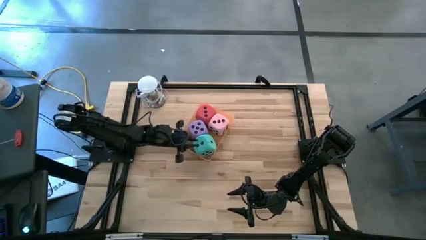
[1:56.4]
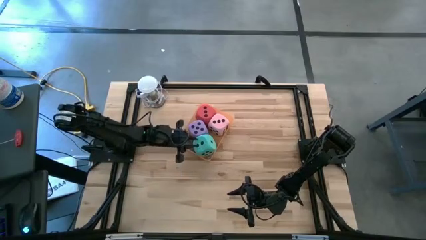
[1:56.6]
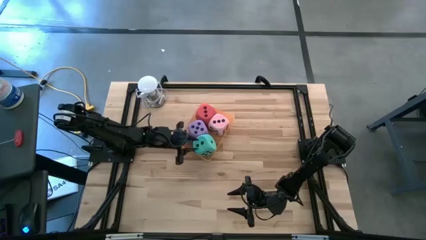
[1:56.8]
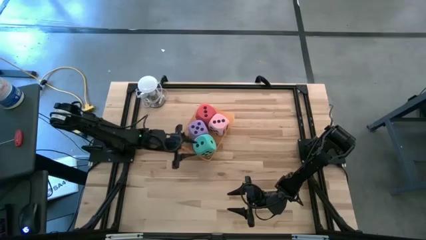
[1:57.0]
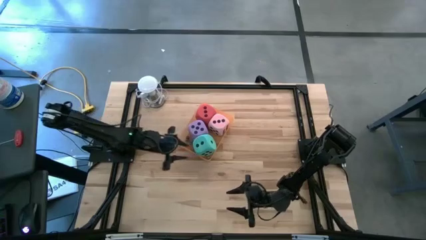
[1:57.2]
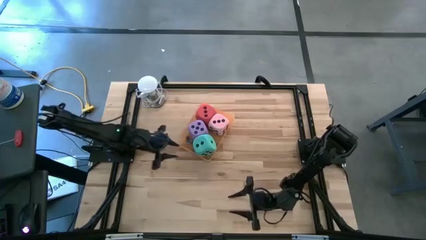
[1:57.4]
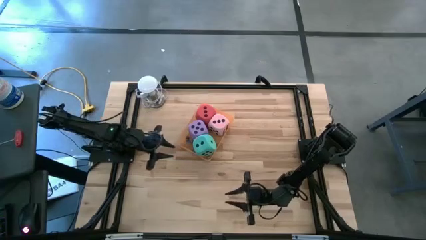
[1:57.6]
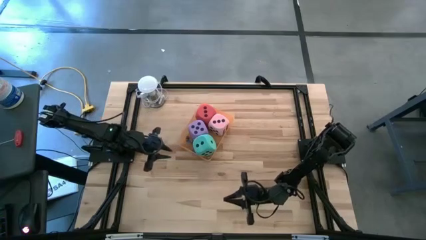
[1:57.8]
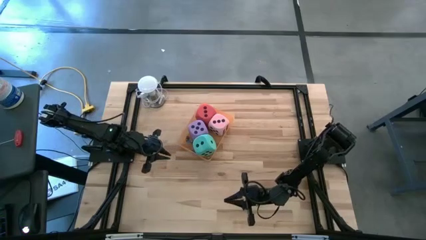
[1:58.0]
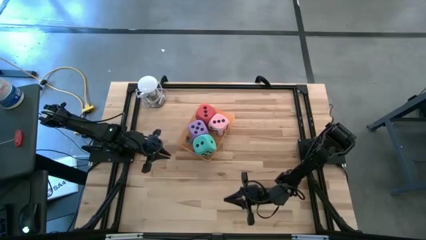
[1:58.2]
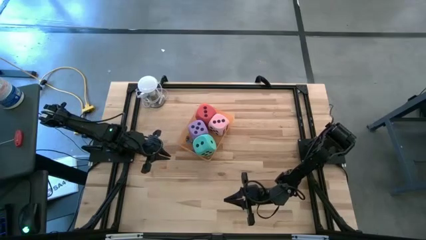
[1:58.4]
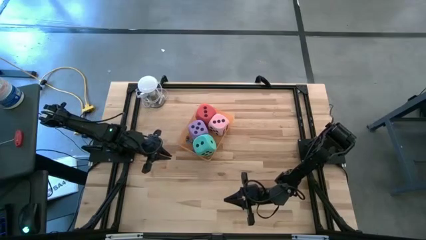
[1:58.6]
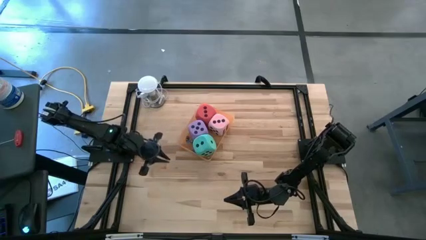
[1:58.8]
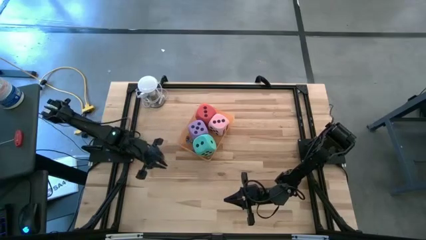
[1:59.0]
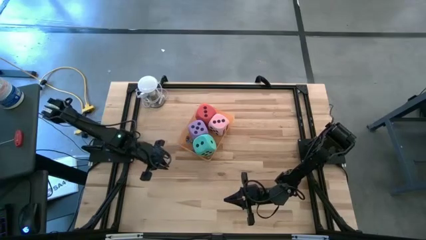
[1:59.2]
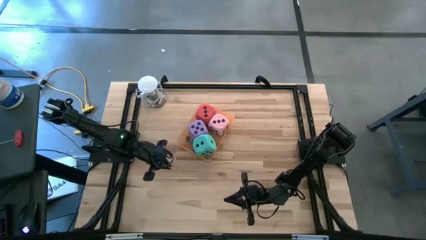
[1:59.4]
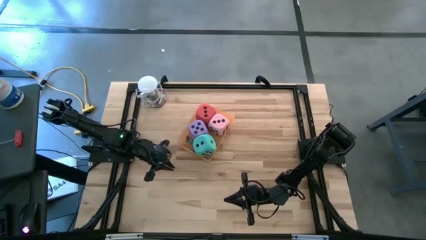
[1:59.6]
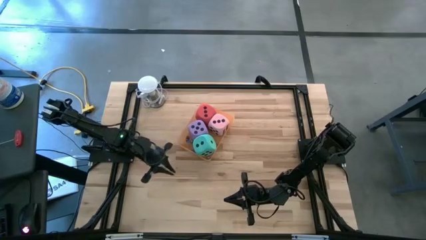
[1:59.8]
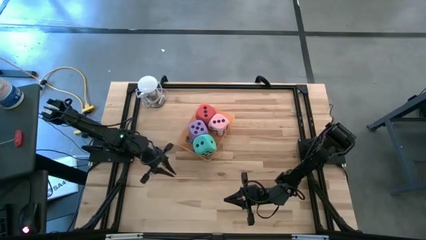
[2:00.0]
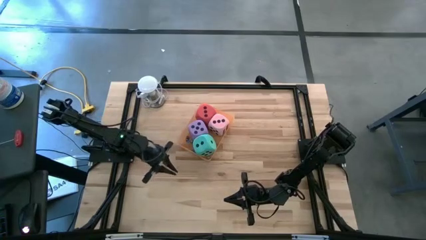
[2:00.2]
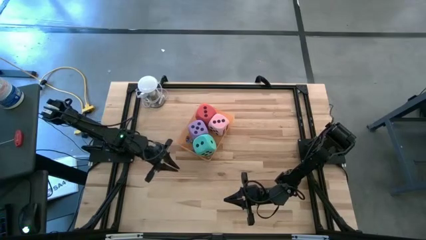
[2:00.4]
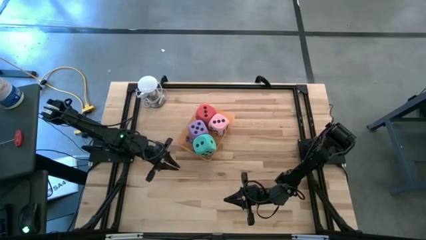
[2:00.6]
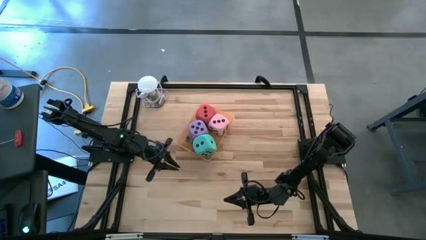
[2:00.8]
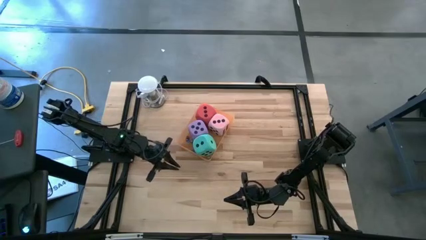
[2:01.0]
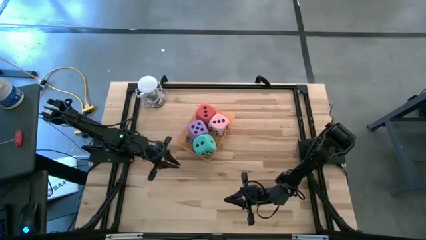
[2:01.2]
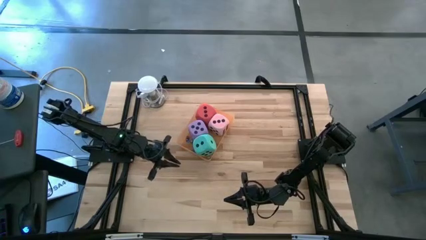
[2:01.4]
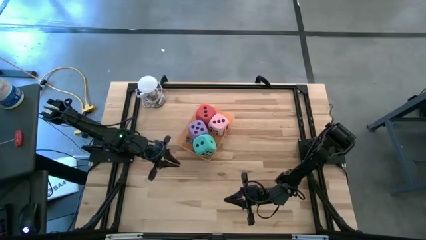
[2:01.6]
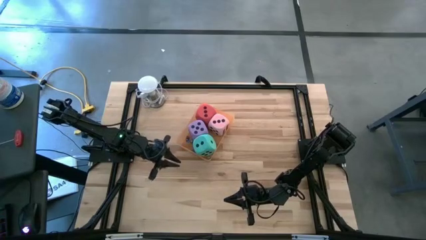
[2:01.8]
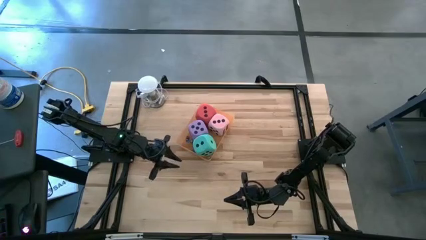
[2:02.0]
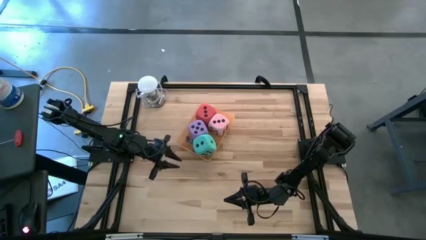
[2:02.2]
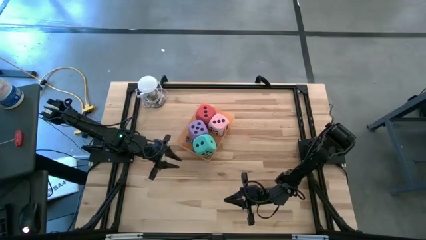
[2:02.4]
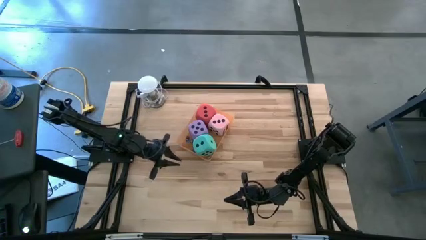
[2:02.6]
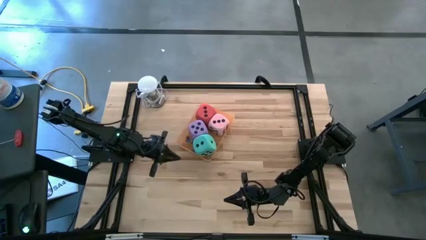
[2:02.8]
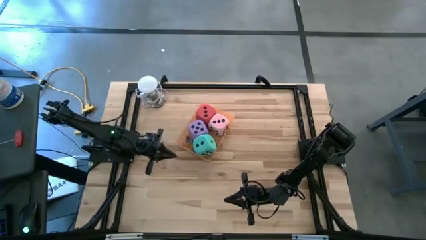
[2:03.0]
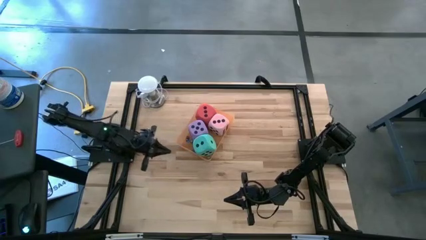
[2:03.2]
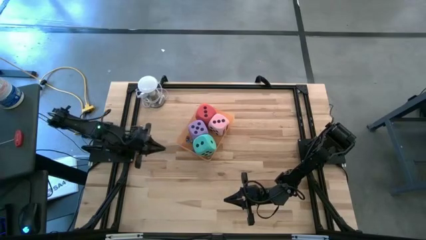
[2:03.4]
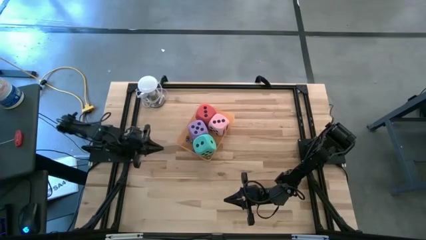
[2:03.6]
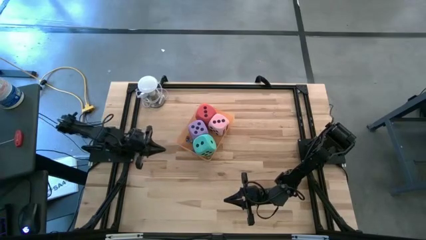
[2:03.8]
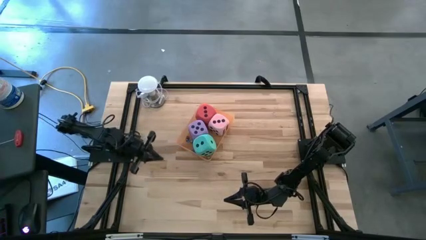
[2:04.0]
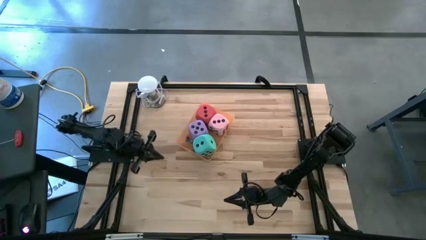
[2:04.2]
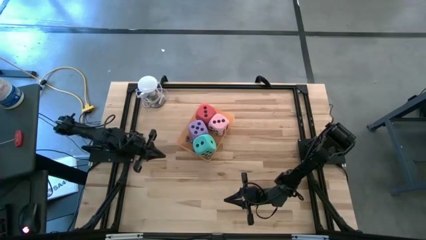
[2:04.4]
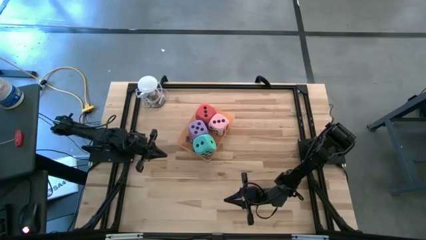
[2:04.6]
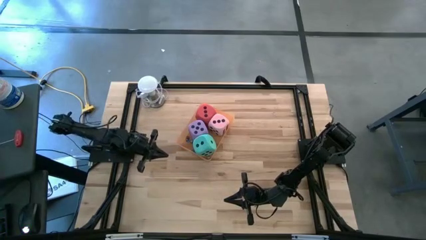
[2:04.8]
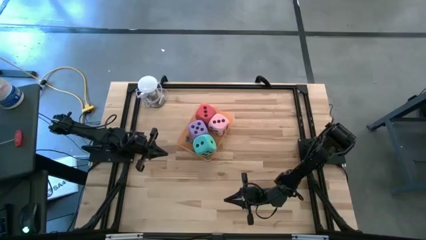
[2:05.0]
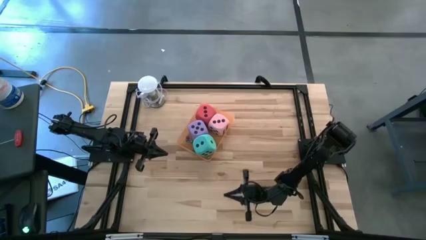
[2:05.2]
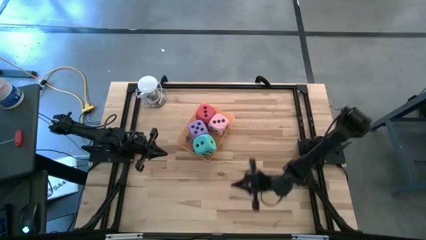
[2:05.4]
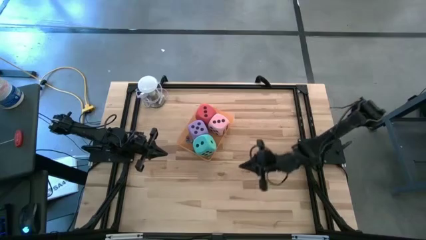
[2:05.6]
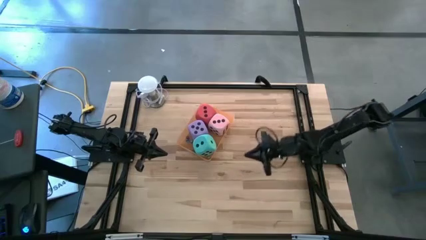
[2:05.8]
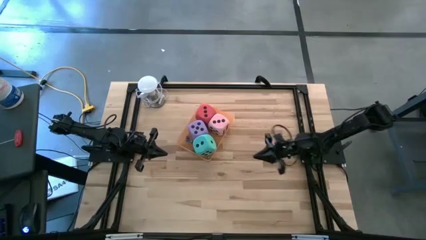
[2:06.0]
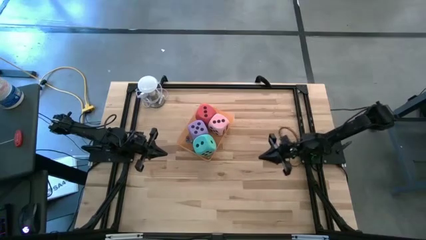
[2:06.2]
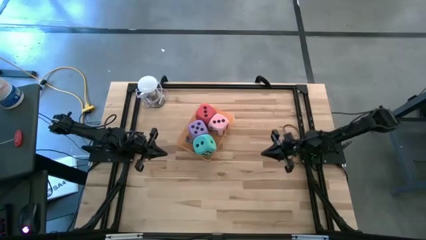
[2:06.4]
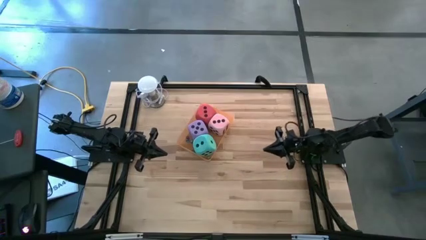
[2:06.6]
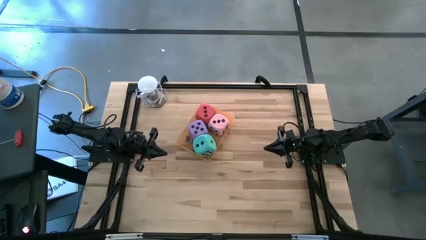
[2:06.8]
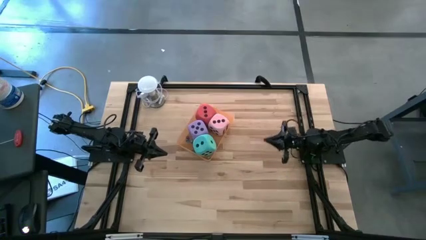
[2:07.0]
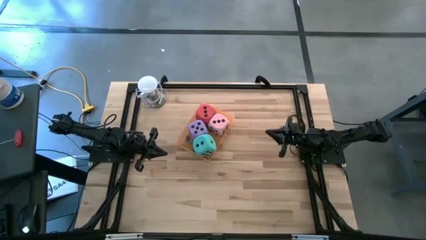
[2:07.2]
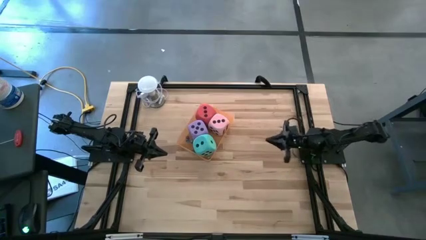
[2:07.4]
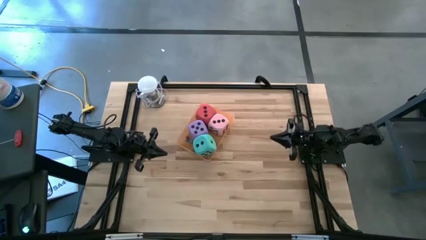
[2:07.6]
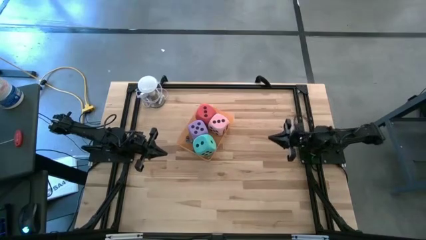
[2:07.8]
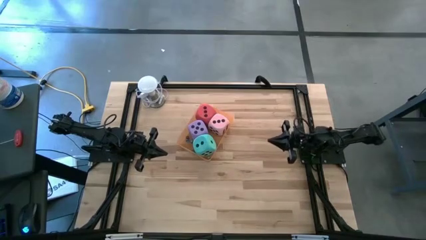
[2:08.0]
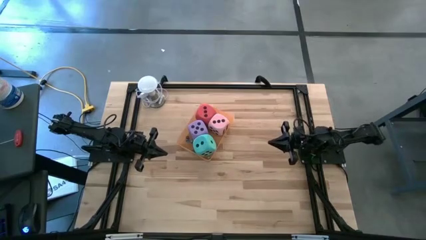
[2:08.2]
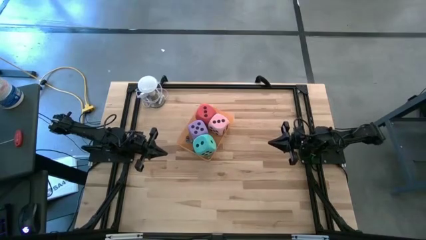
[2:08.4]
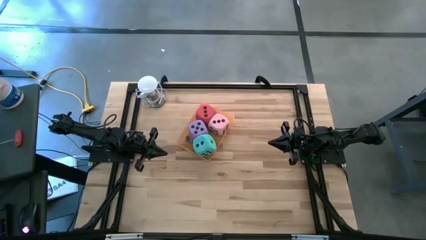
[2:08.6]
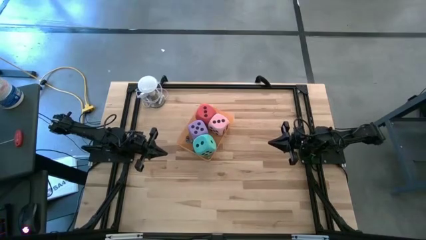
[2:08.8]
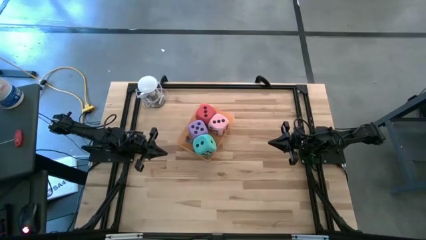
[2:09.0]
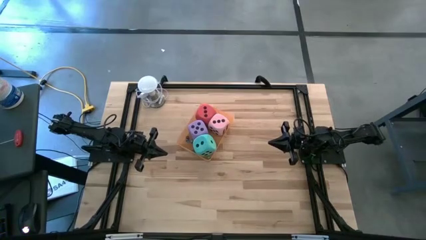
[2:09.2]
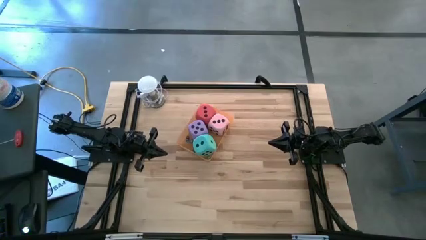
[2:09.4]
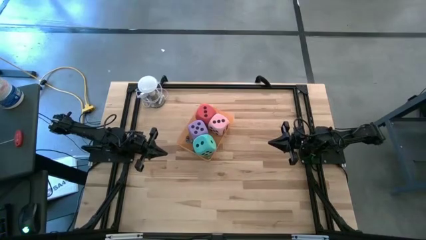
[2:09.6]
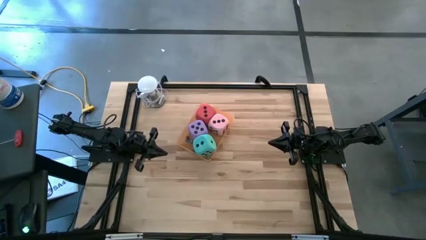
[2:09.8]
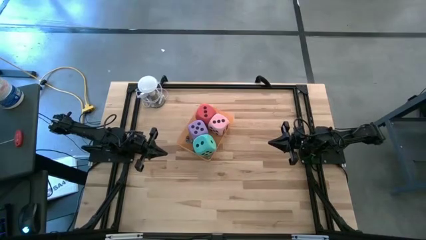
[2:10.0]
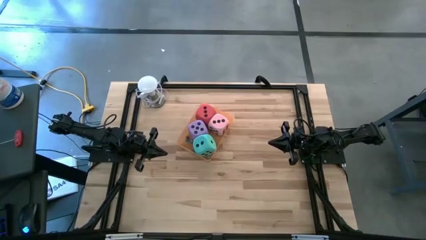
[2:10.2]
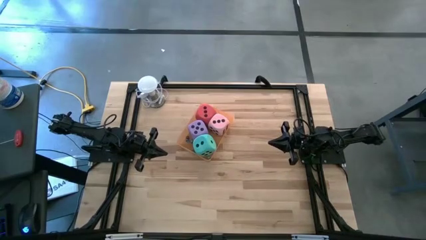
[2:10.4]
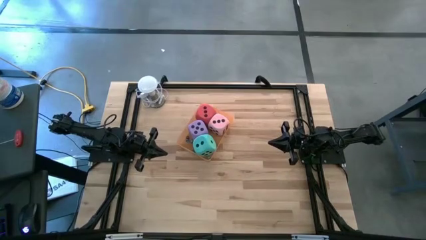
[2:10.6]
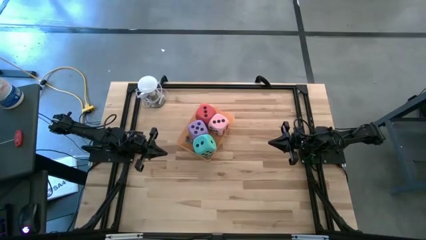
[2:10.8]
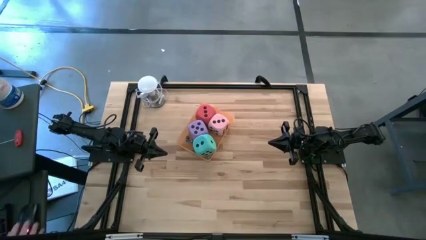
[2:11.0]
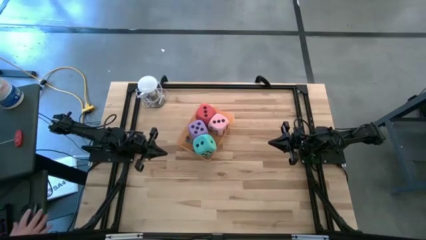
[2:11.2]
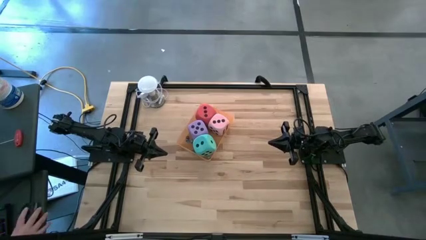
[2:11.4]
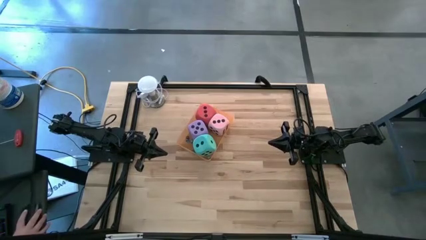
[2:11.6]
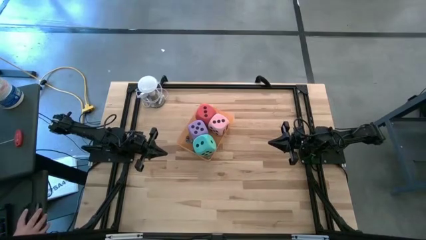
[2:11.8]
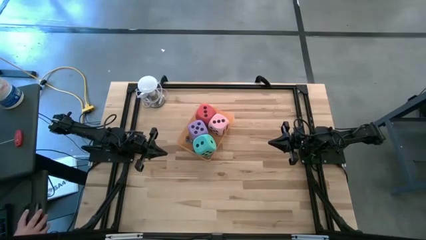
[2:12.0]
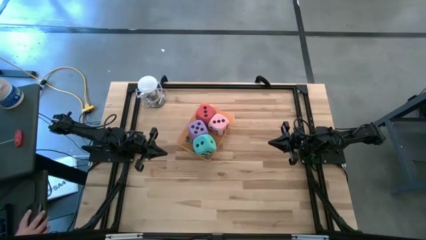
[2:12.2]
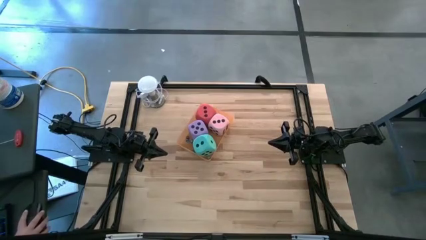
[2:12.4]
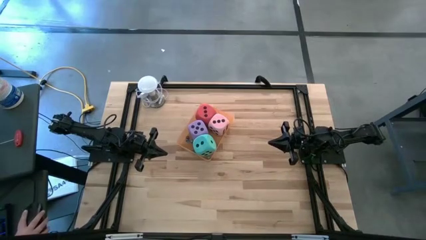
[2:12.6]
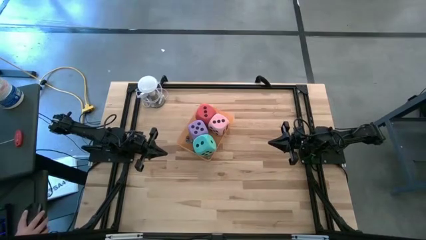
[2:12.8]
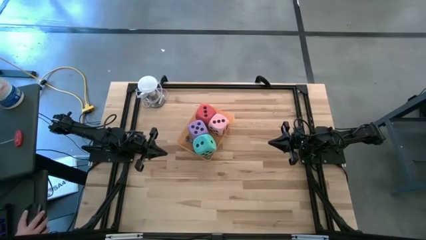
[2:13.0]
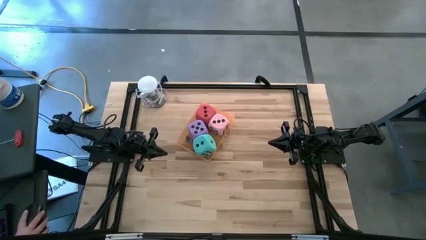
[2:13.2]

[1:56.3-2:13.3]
Task: Pick & Place Dice
Return to Home Position
